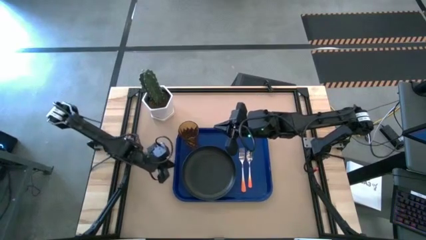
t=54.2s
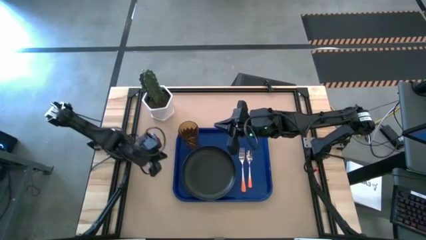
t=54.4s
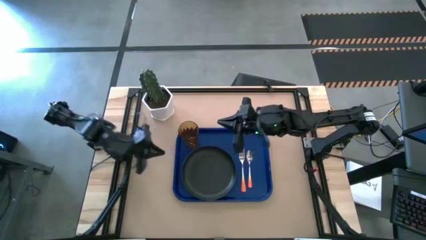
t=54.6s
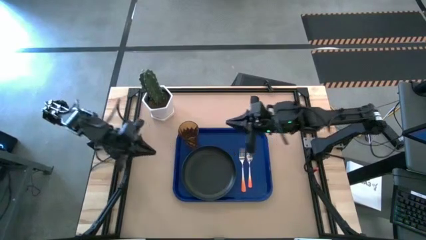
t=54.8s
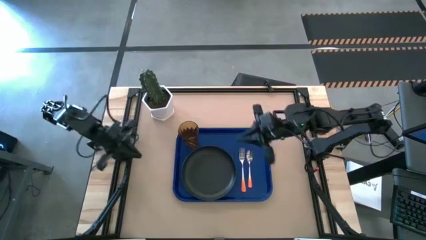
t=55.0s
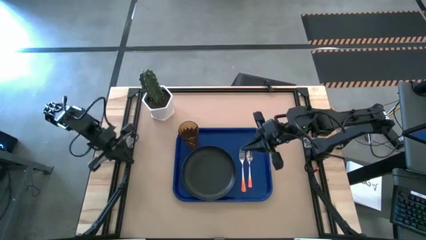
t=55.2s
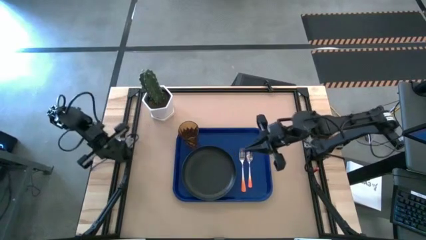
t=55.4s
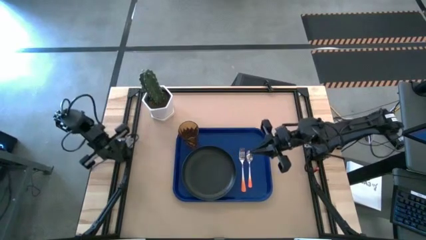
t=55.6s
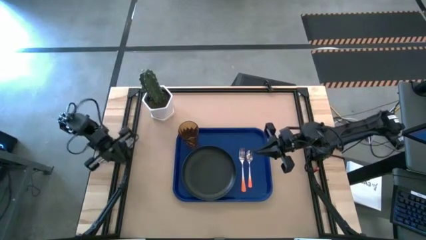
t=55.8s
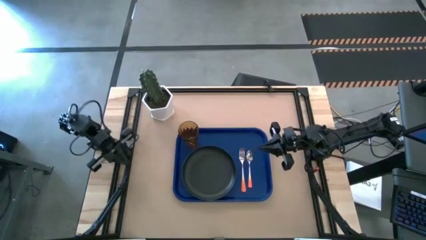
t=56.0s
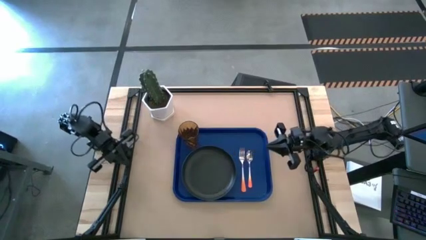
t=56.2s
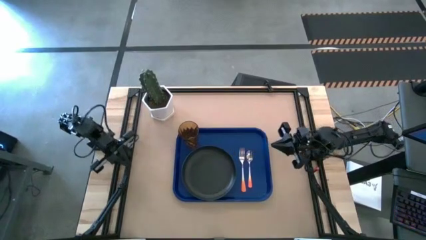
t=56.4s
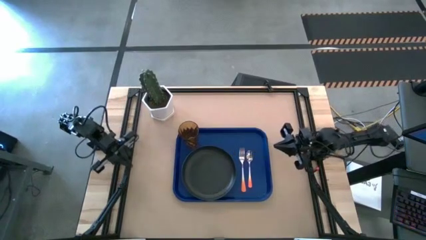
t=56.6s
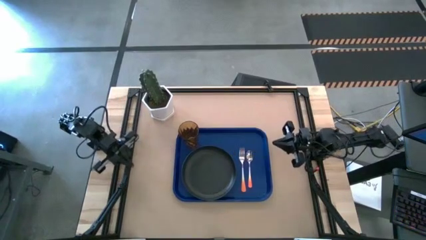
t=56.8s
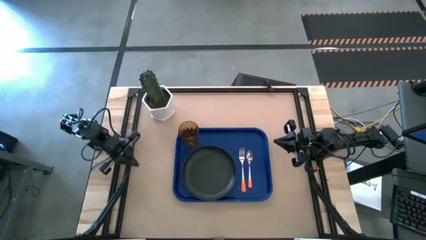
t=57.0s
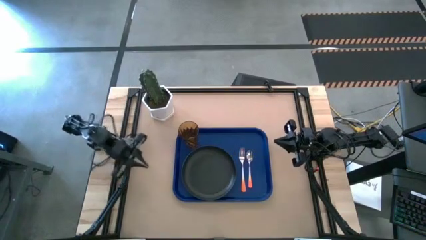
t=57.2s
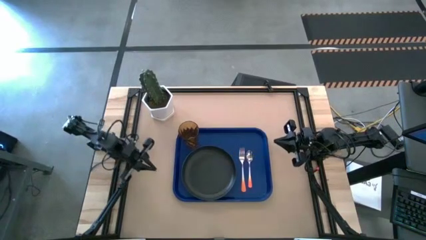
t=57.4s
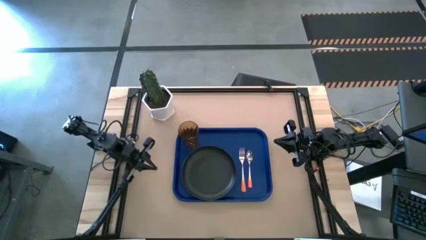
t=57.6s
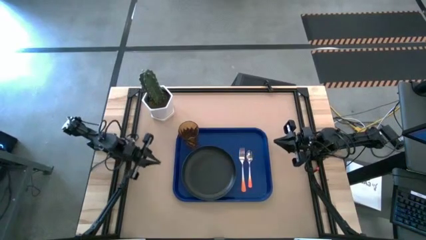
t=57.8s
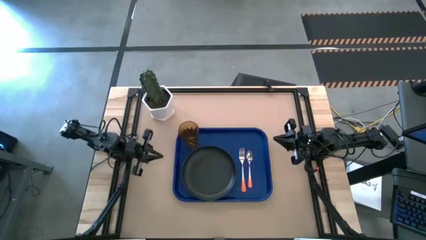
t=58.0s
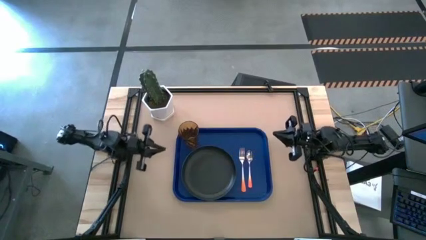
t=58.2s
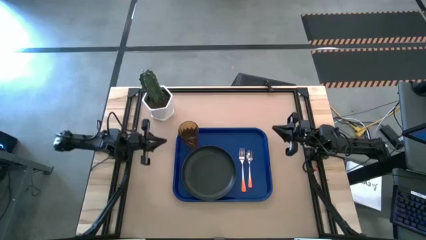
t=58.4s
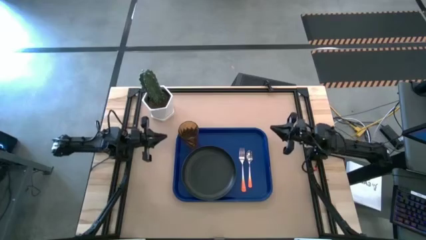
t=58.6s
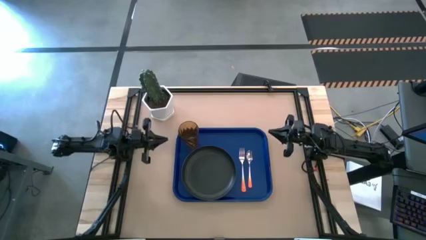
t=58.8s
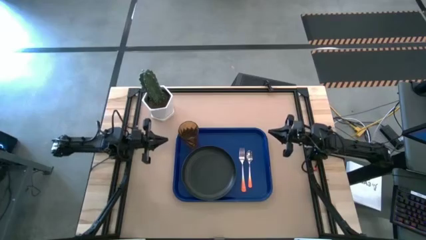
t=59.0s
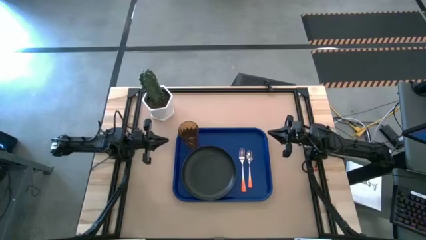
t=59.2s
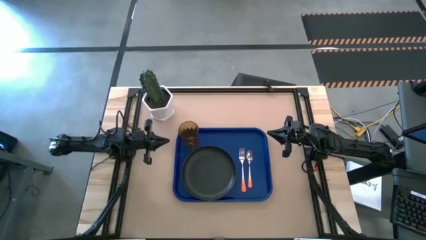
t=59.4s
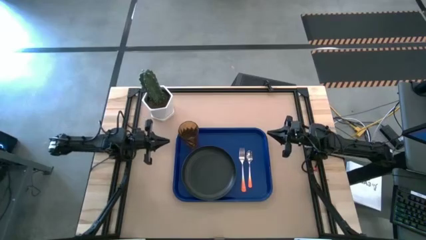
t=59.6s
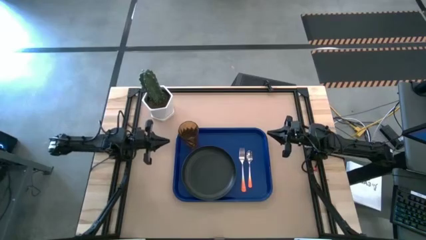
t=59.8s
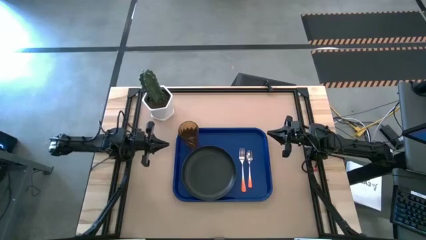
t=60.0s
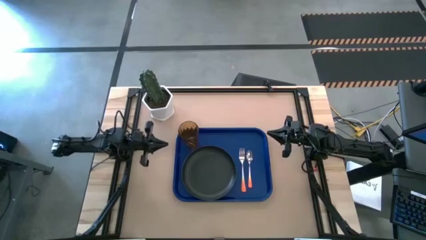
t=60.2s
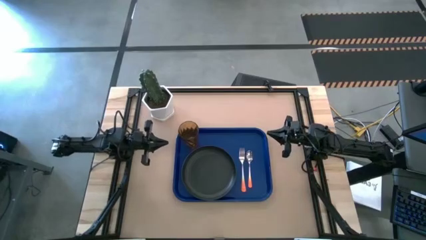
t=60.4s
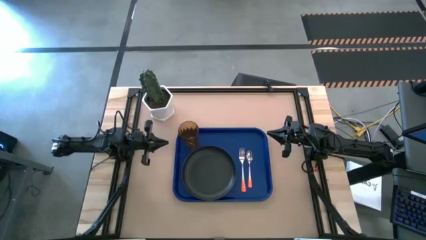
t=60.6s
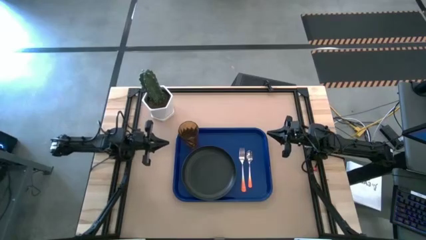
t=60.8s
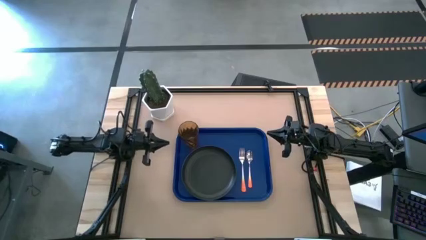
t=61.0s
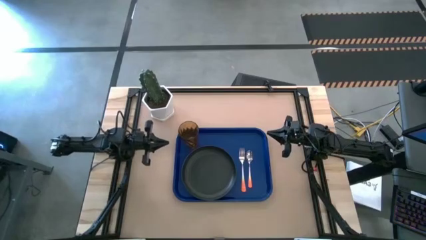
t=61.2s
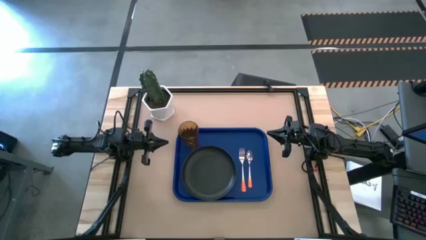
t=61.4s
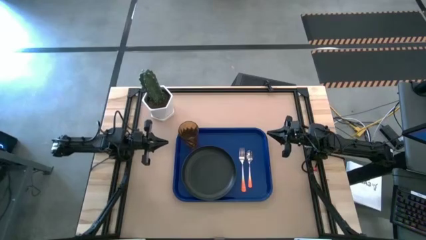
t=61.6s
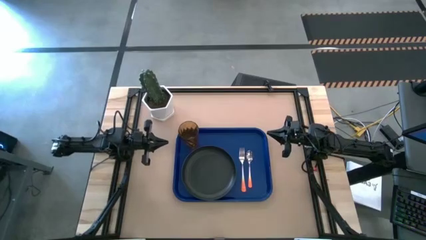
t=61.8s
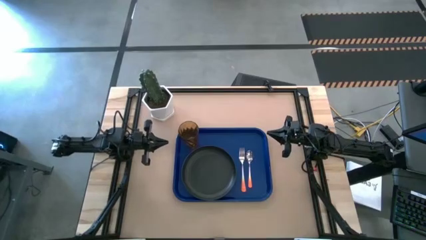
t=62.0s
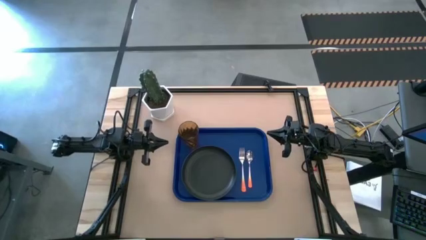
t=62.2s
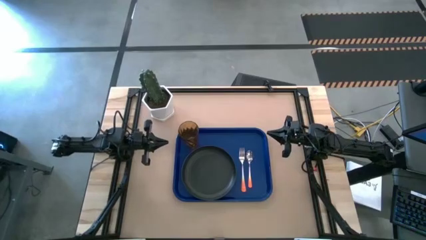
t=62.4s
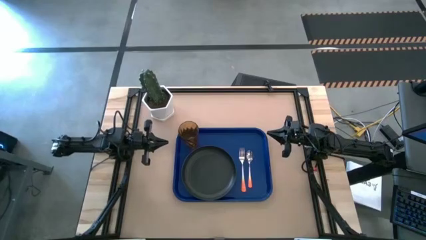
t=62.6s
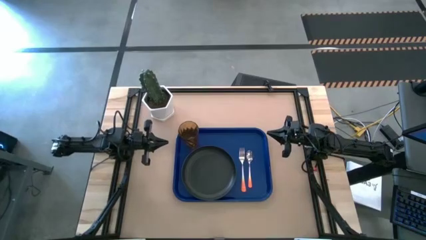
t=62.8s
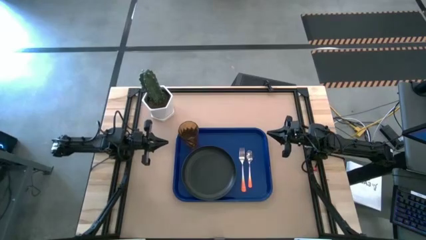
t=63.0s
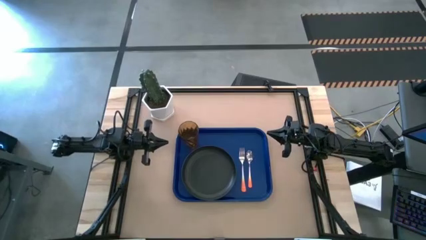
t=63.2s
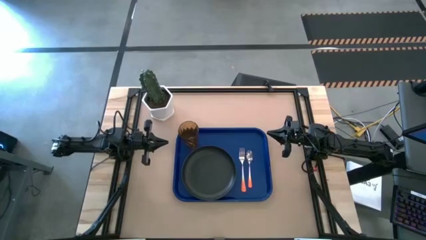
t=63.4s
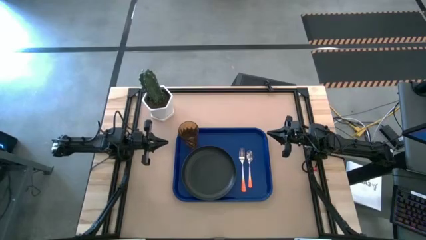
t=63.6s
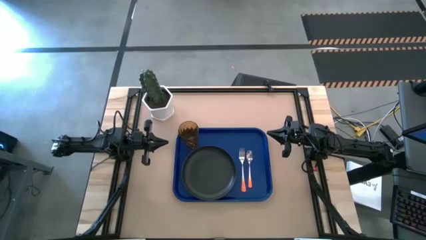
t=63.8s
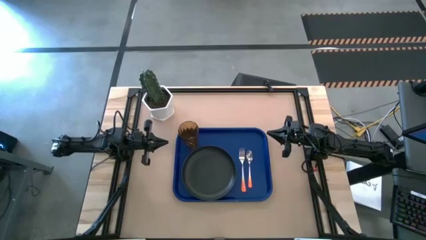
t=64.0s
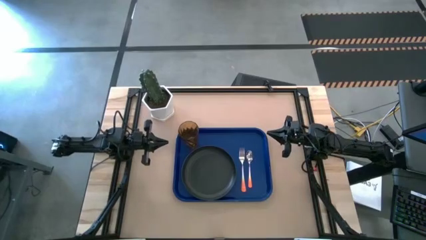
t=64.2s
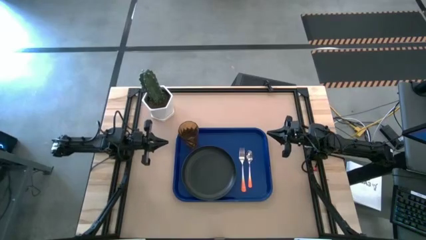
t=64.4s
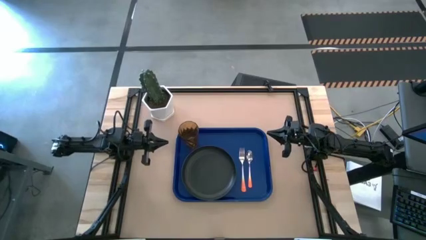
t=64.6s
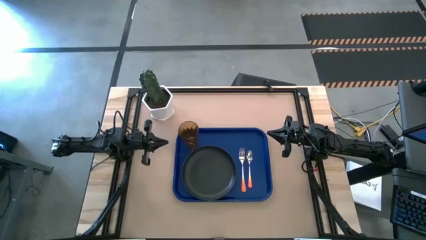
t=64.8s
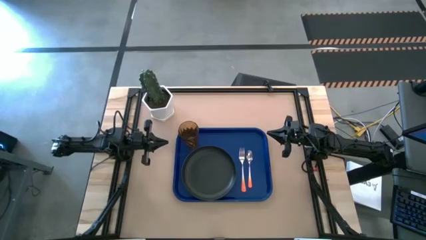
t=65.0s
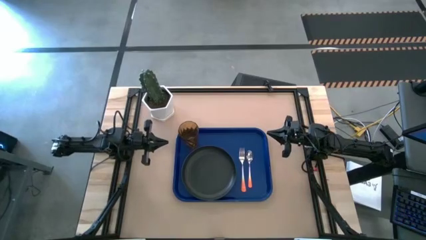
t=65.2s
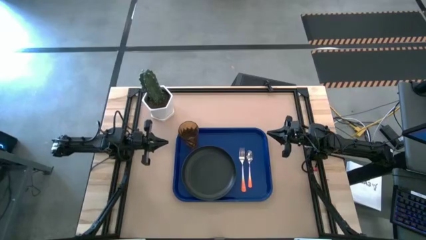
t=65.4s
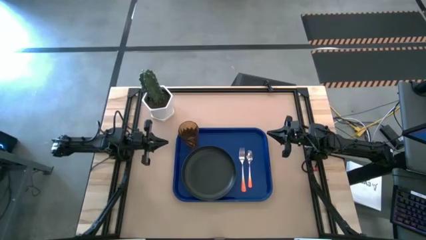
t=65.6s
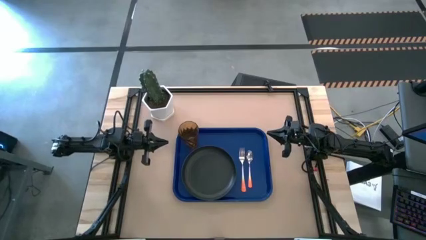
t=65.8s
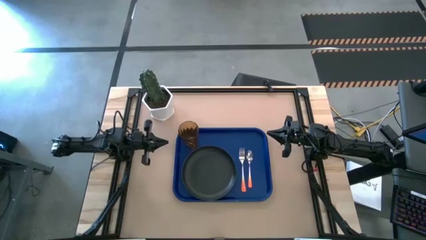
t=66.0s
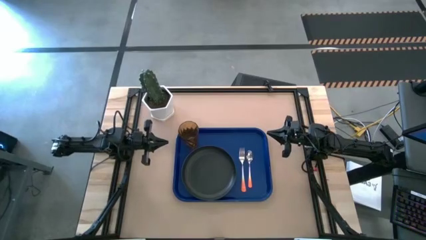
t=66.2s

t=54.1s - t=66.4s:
Task: Pick and place plate/cup/fork/spoon on tray
Return to Home Position

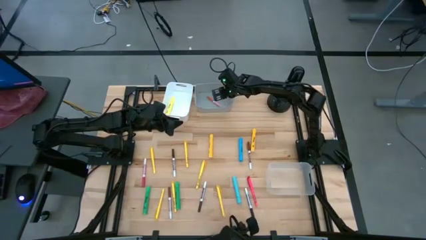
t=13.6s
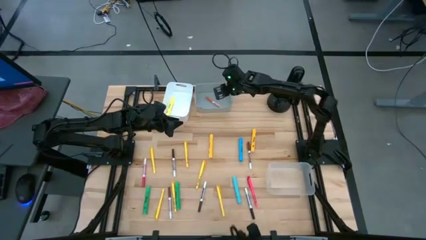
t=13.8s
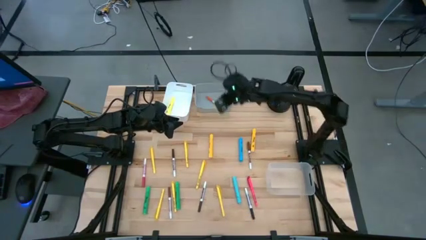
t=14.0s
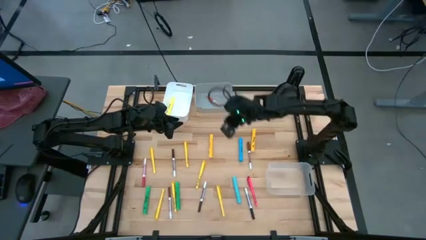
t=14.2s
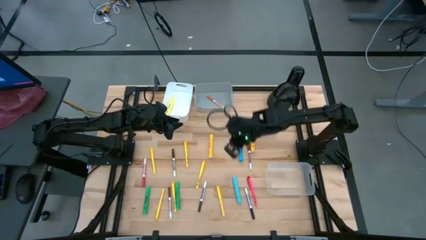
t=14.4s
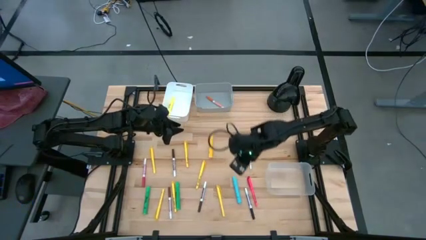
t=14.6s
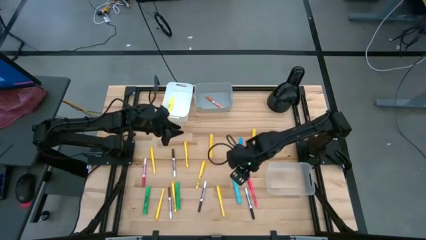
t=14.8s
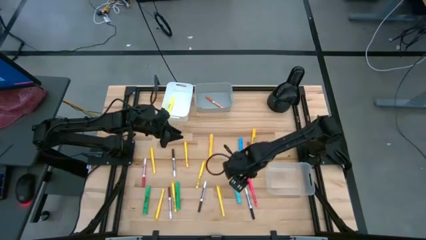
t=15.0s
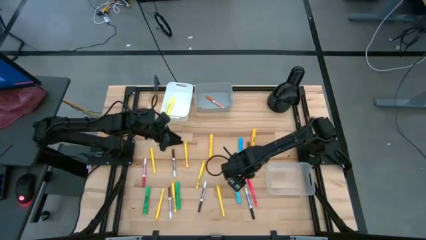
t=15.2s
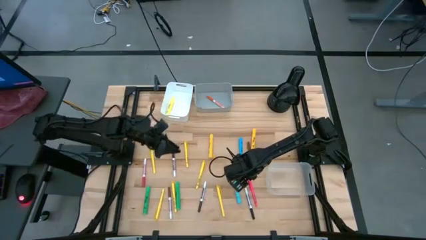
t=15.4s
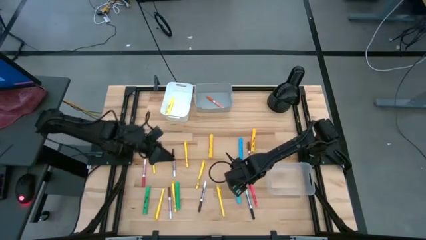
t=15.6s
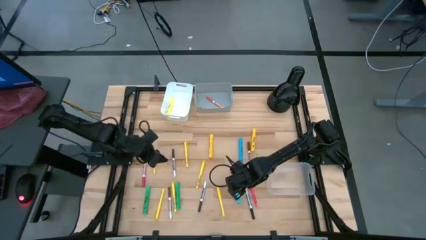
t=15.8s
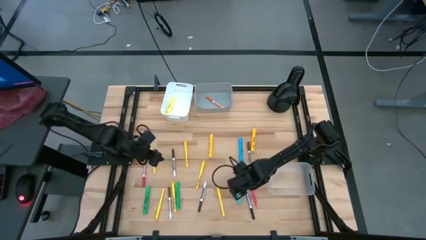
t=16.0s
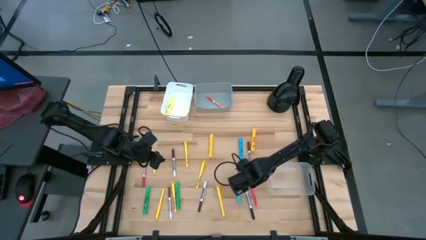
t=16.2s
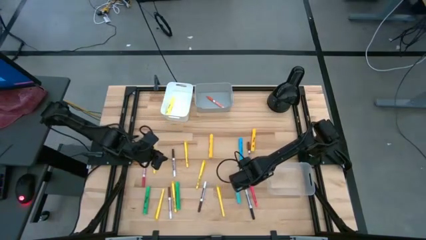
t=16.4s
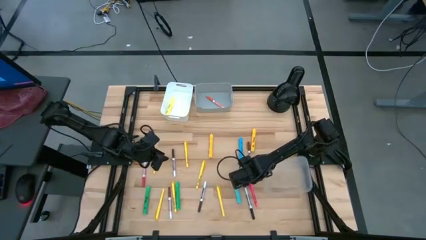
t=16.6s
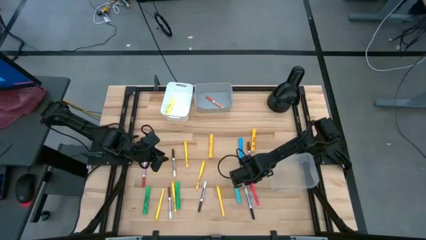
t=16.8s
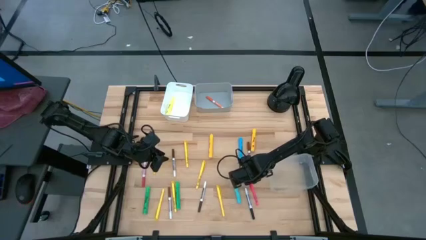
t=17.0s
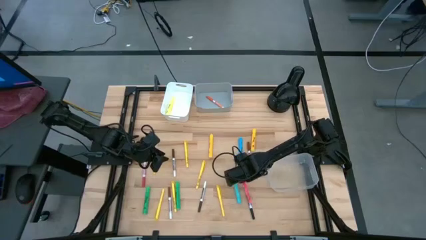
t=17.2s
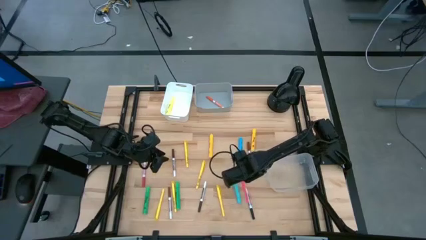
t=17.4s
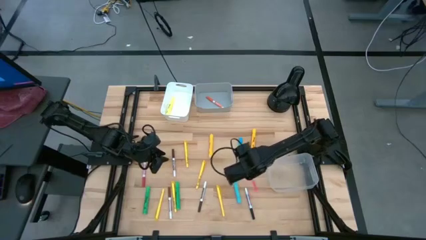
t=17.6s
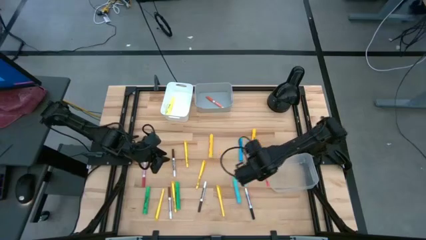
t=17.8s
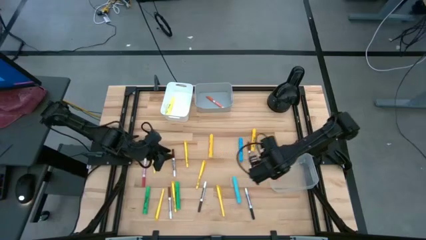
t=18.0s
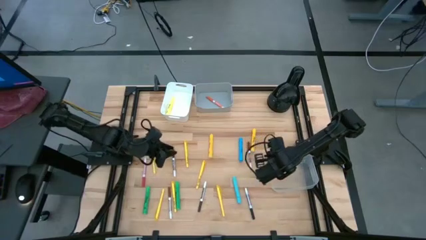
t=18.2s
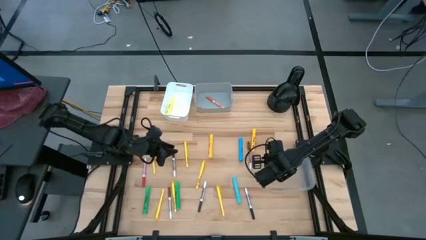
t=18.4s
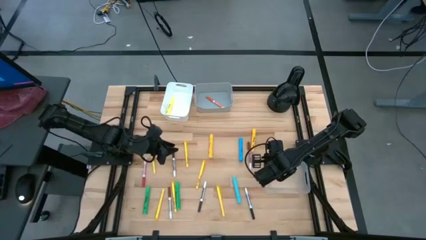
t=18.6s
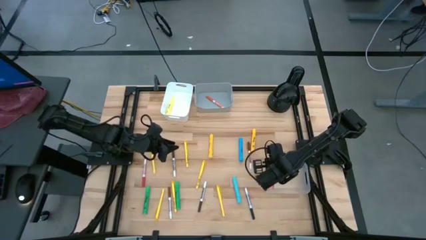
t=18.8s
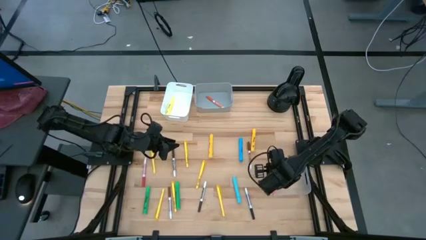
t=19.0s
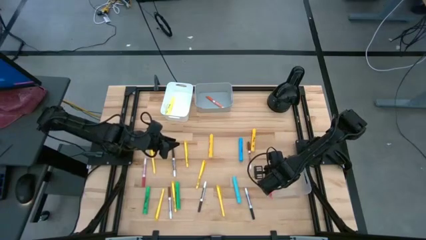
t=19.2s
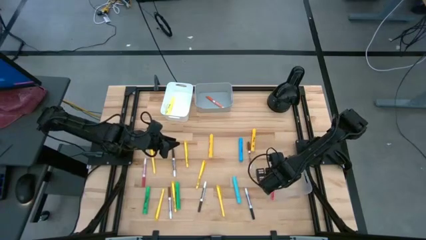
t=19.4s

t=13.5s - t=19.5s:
Task: Pick & Place Markers
Put the pink pen into the transparent bin
